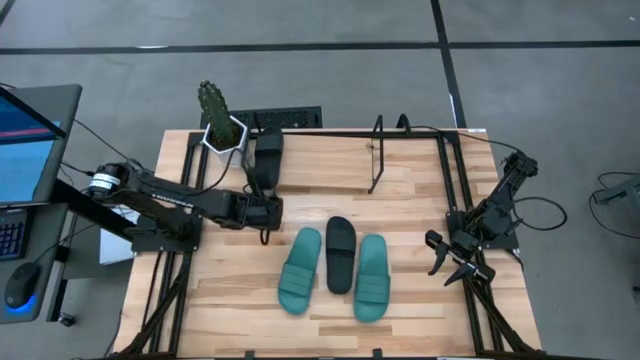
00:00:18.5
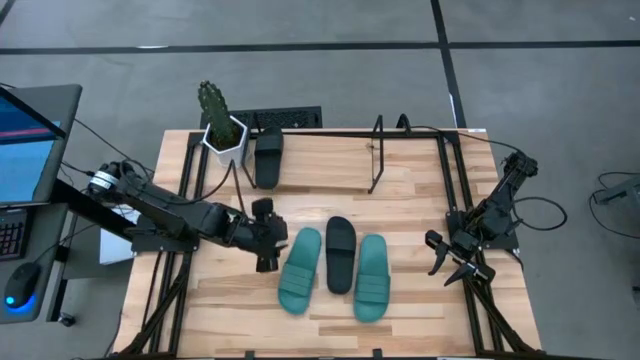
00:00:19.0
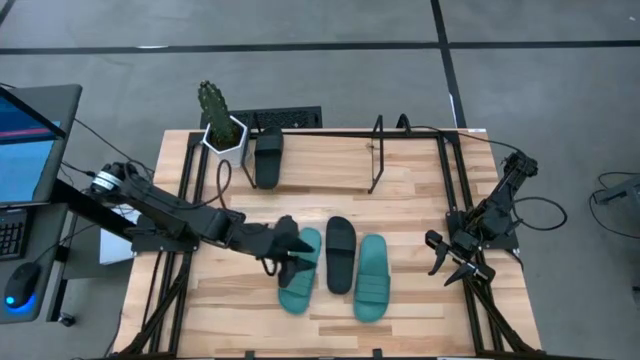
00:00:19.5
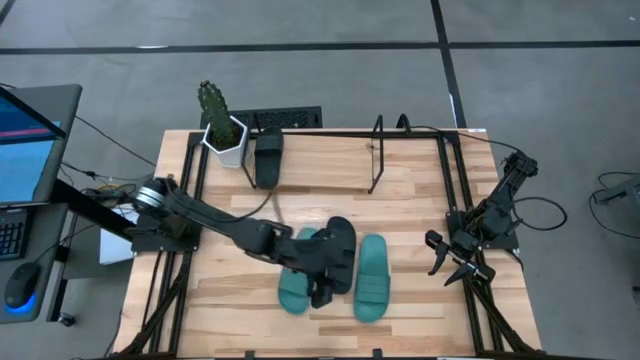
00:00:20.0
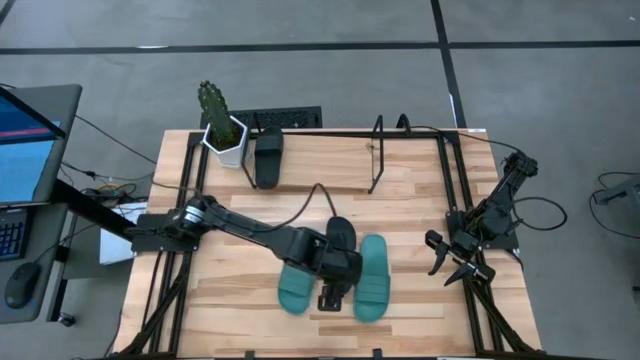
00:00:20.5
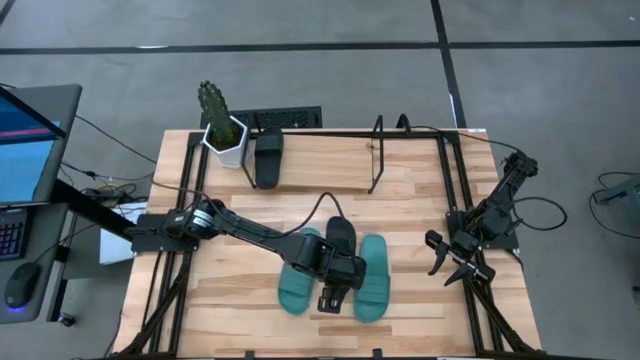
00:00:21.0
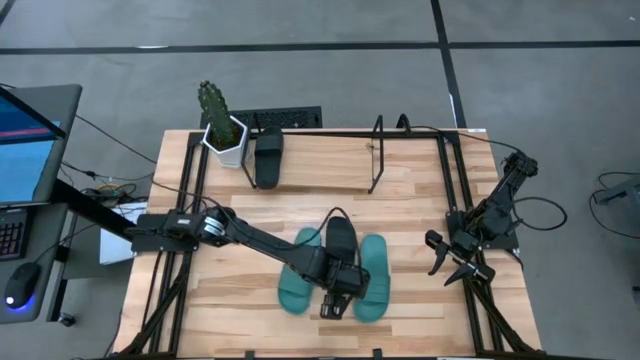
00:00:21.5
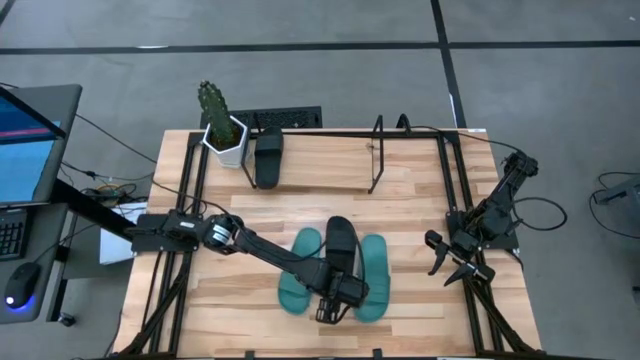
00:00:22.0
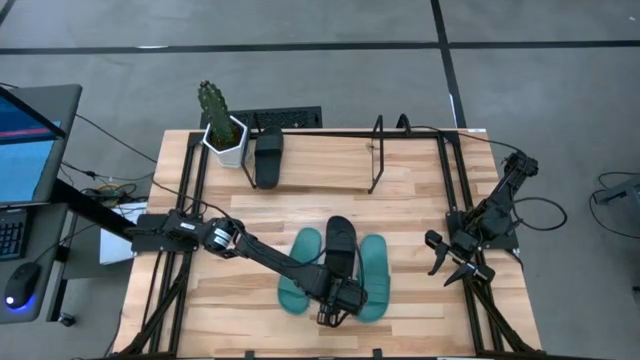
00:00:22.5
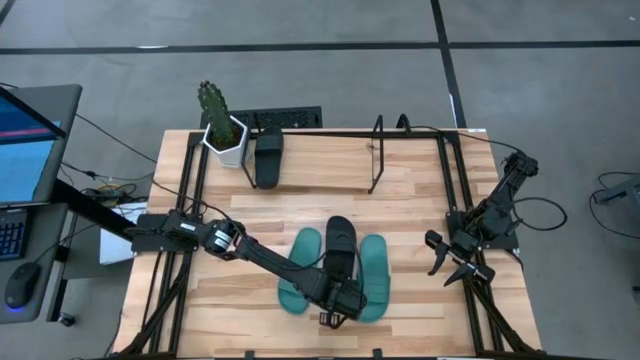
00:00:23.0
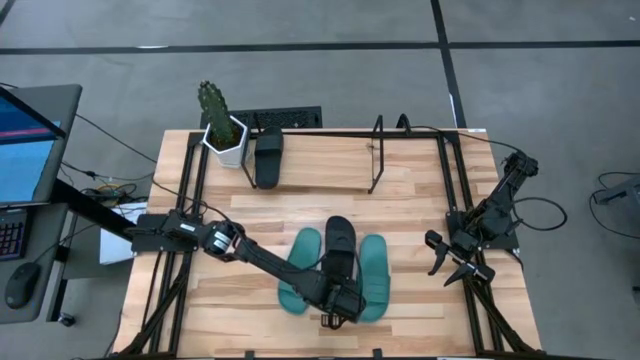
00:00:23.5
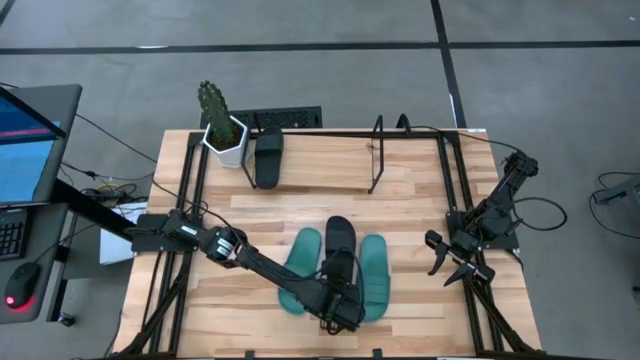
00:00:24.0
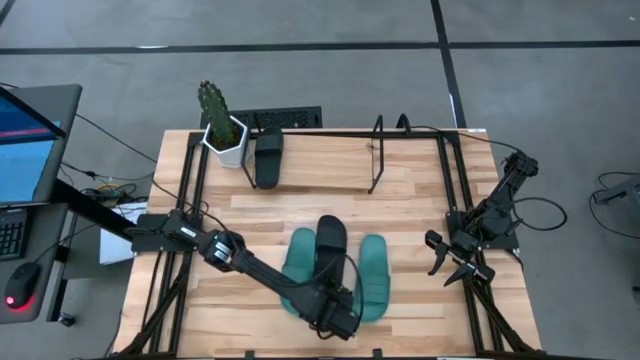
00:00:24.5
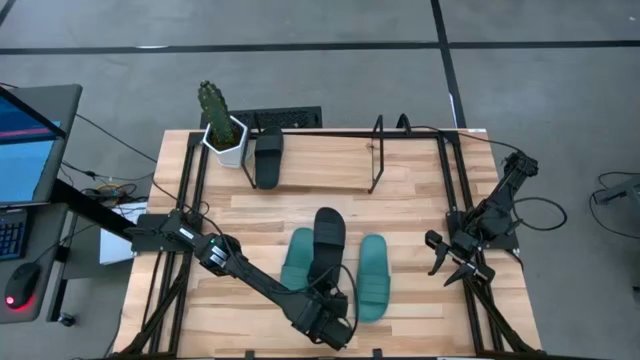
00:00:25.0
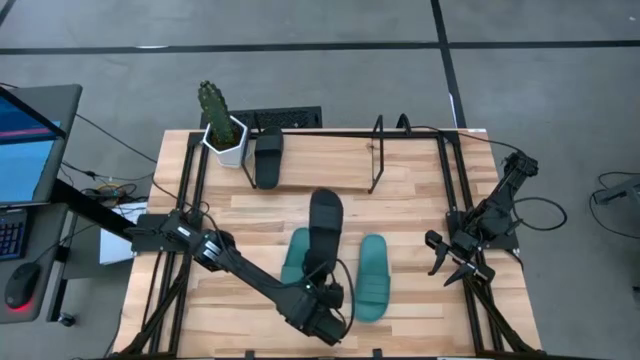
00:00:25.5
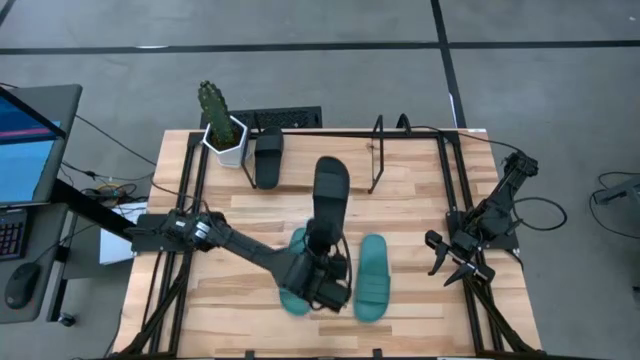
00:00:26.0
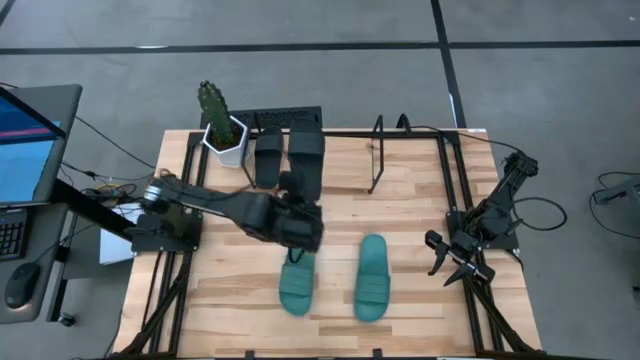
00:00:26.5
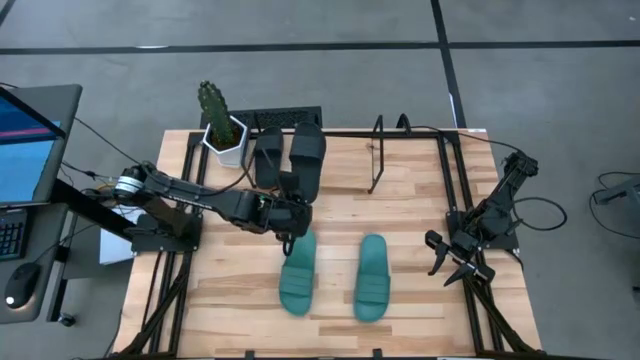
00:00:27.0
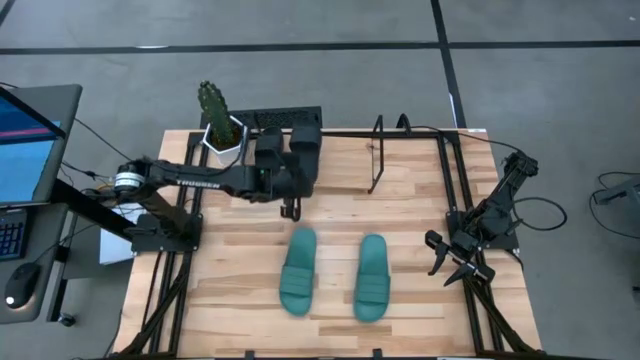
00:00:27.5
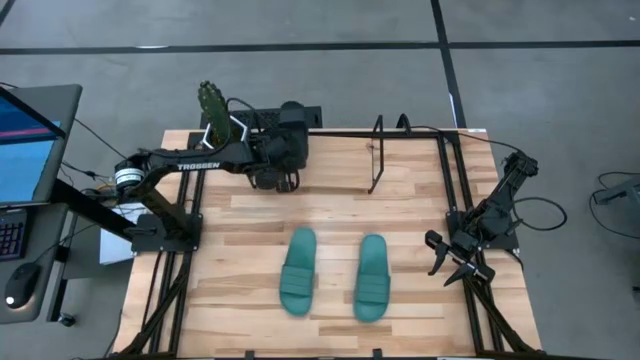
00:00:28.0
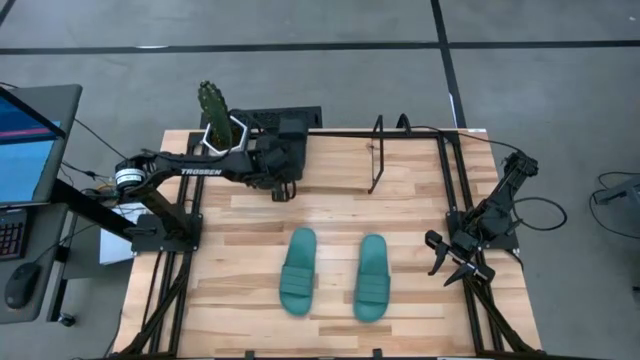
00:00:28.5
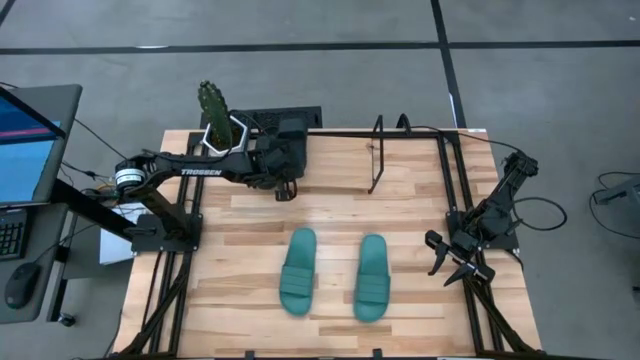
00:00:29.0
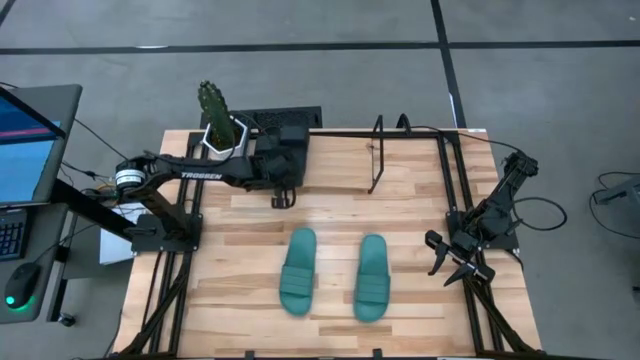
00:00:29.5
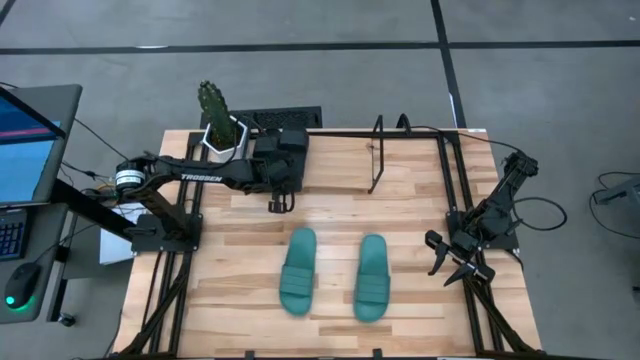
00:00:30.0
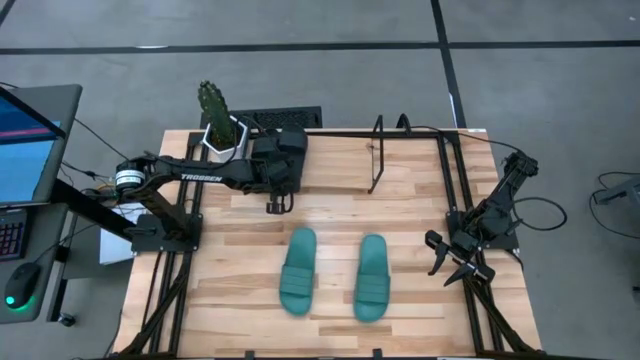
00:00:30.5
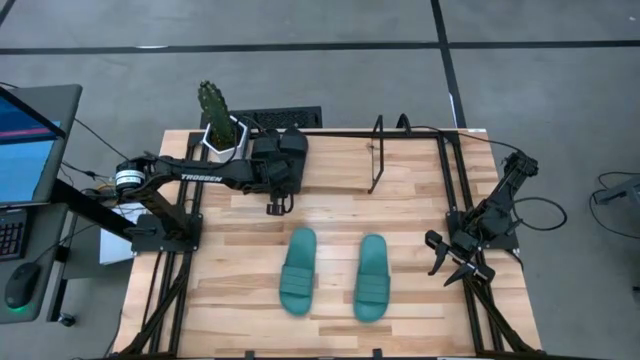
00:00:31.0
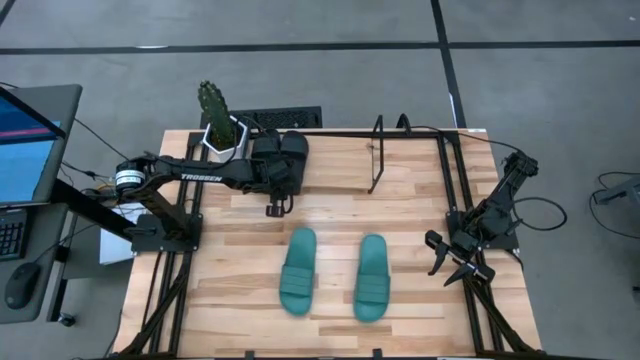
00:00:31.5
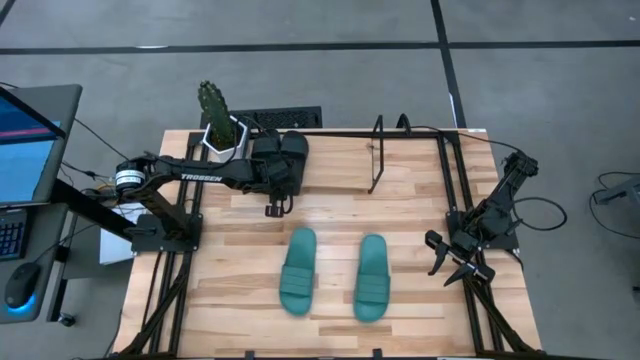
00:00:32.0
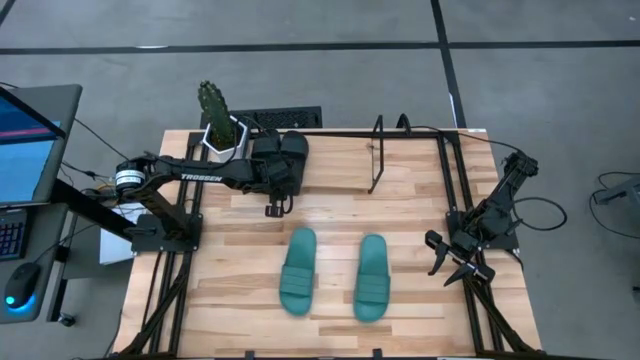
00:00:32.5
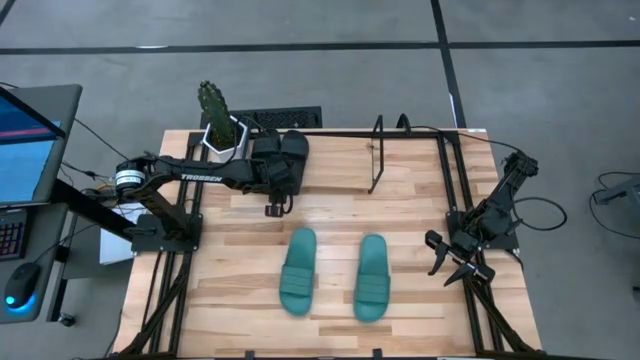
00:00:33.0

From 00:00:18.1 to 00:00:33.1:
Task: Pick and place slides into the shelf
Put the black slide on the shelf

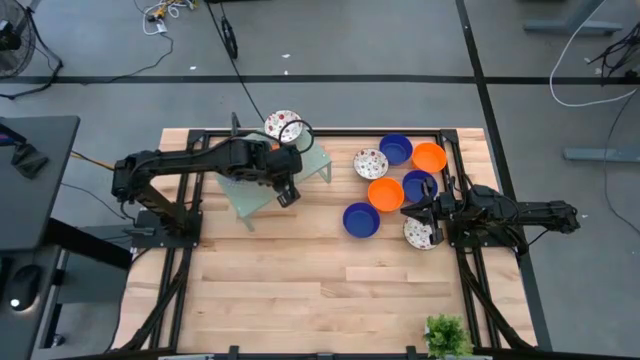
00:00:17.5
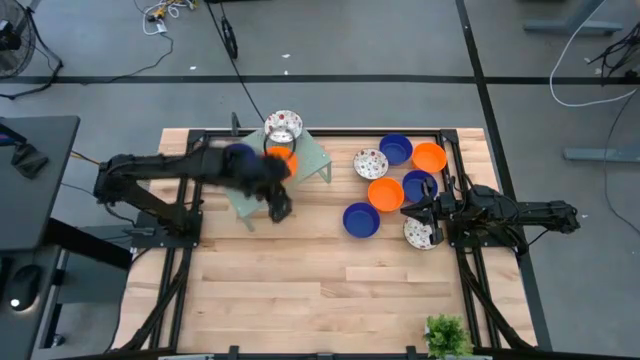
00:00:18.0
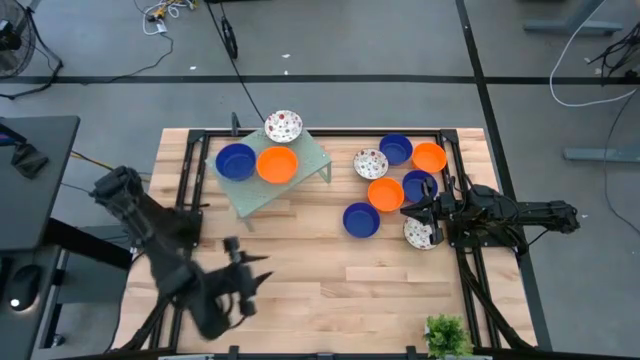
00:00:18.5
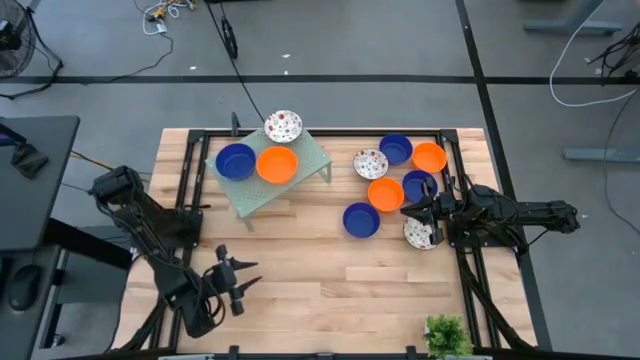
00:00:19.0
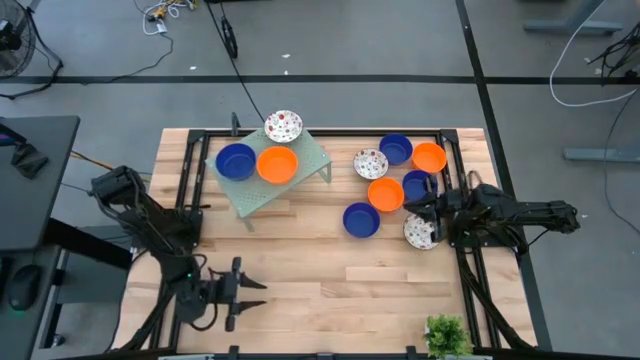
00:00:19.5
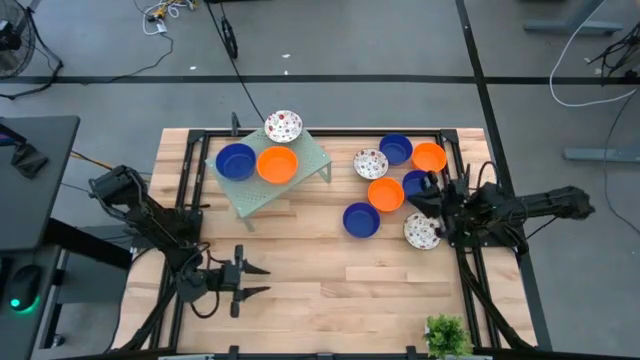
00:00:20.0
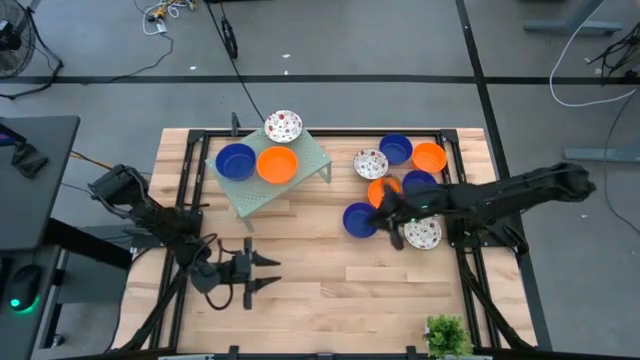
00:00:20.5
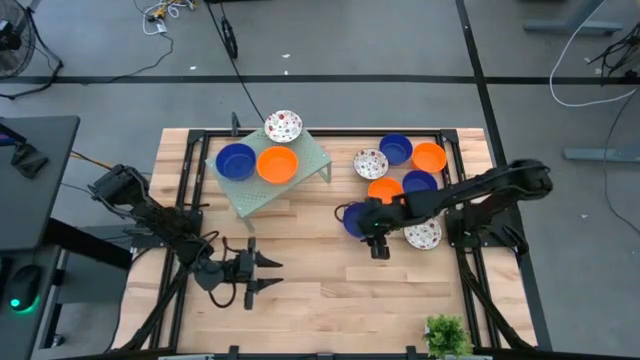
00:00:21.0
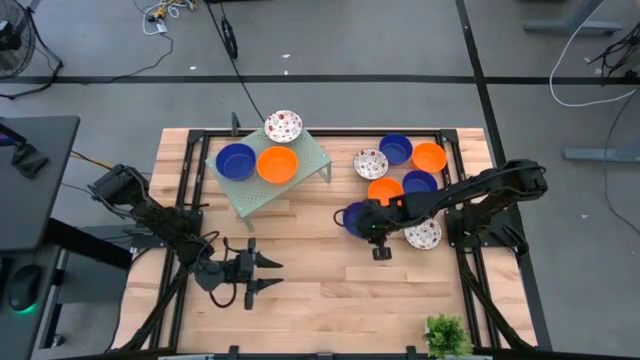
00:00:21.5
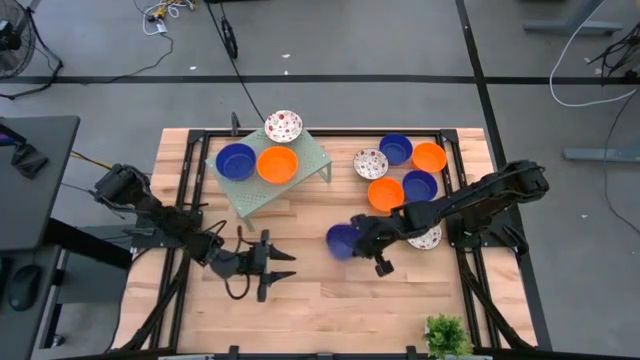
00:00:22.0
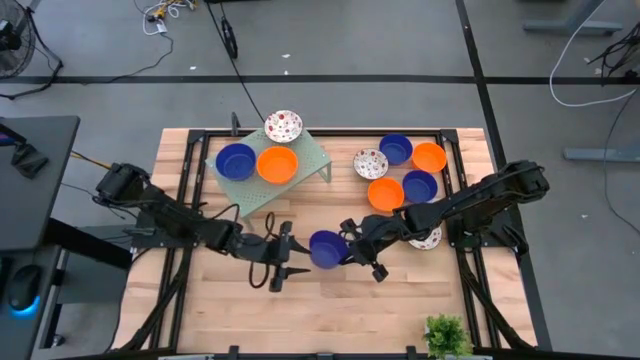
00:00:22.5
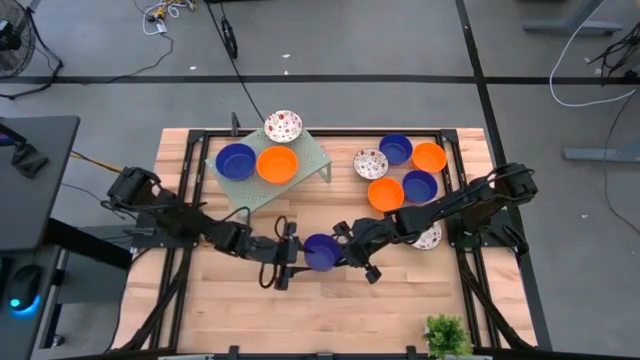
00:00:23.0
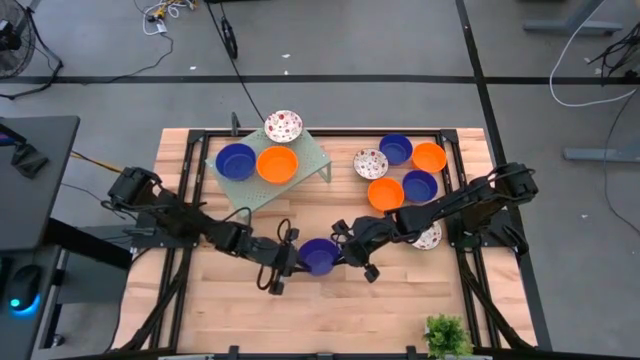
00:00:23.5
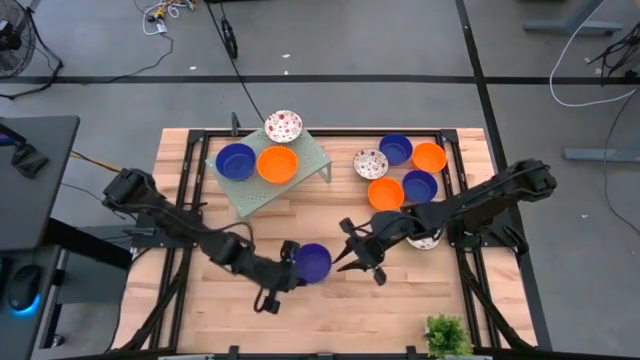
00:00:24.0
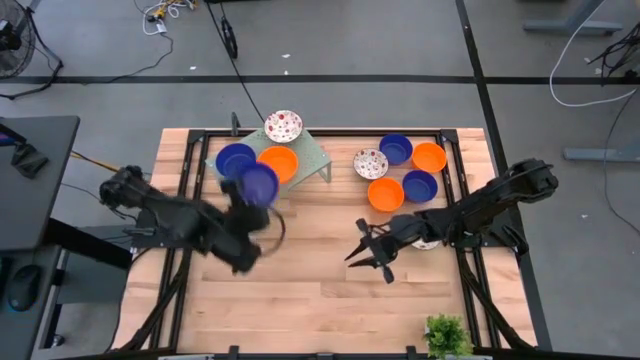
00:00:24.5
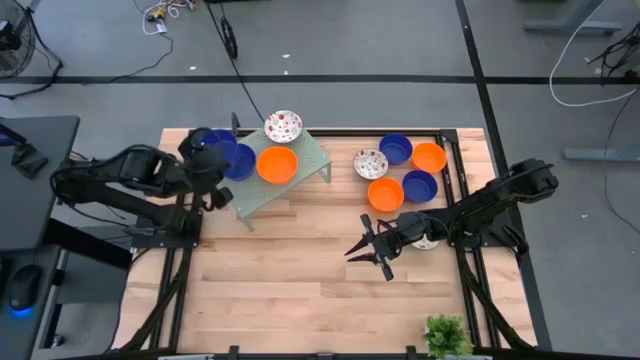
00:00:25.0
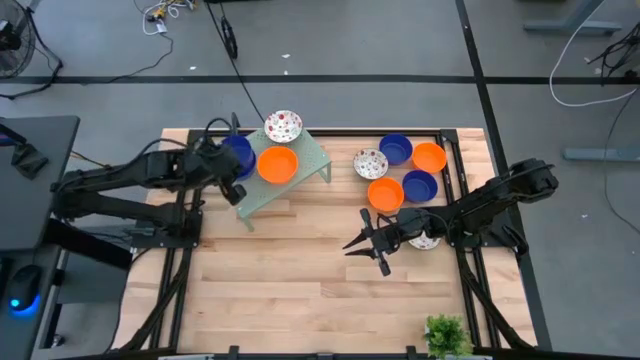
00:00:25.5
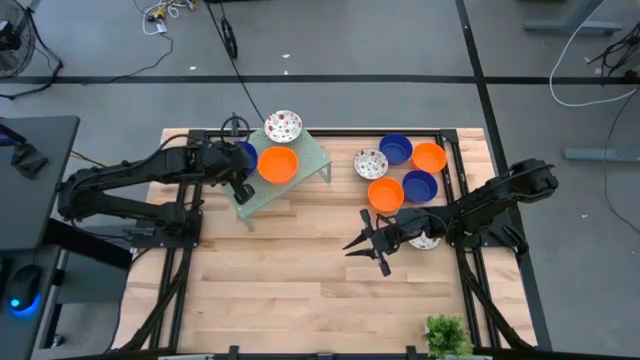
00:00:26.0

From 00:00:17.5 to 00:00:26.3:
Task: Pick & Place Mini bowls
Stack the blue bowl on the blue bowl on the shelf
